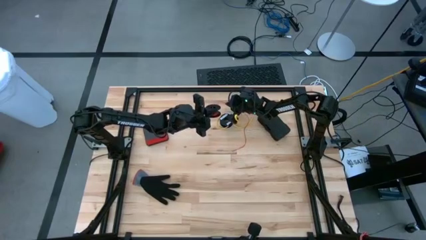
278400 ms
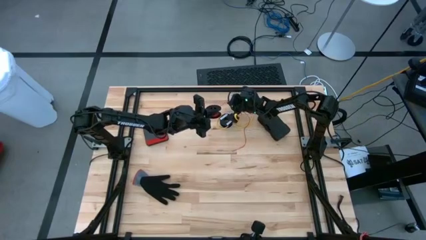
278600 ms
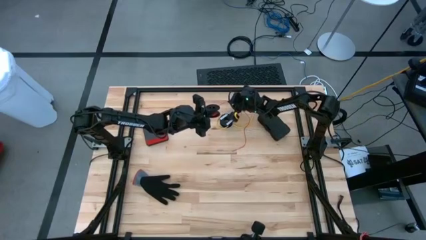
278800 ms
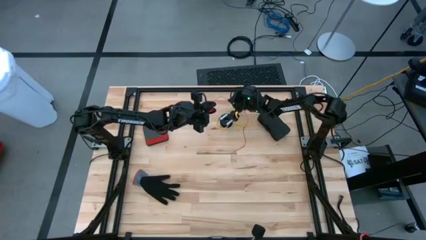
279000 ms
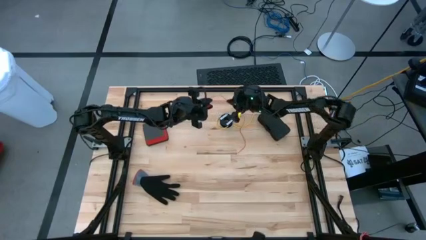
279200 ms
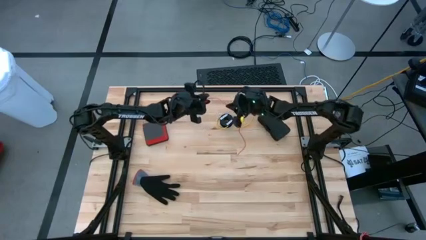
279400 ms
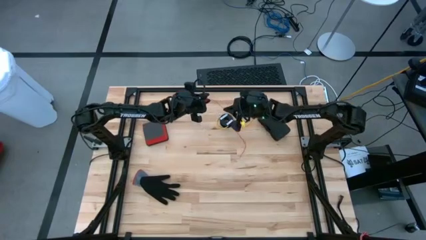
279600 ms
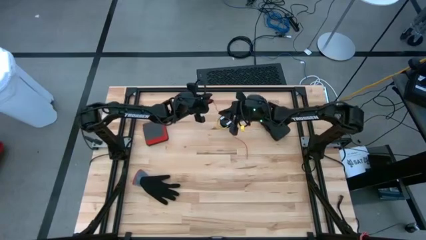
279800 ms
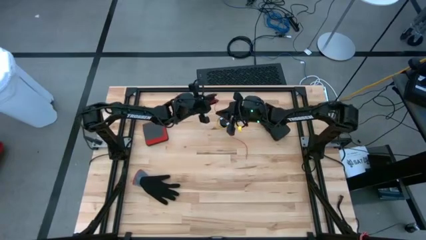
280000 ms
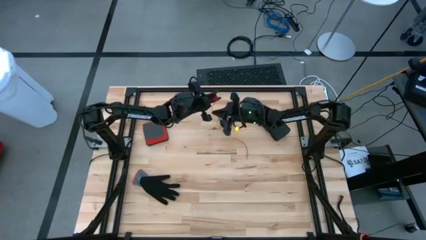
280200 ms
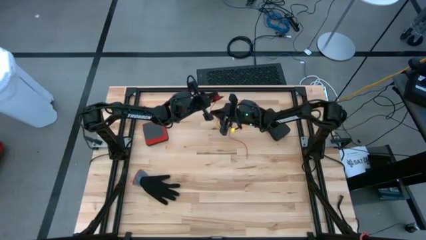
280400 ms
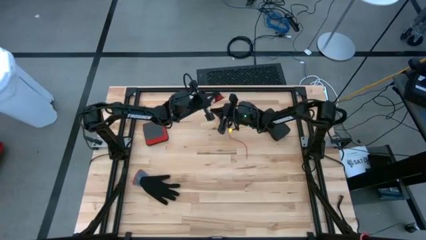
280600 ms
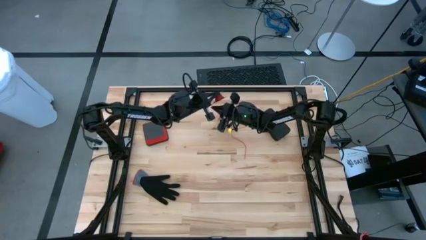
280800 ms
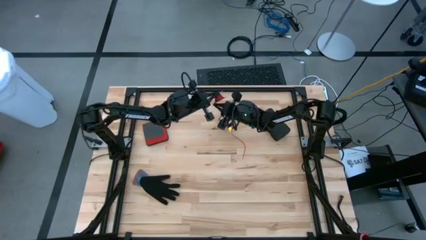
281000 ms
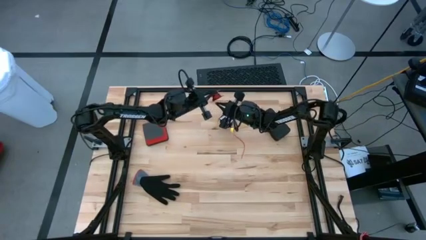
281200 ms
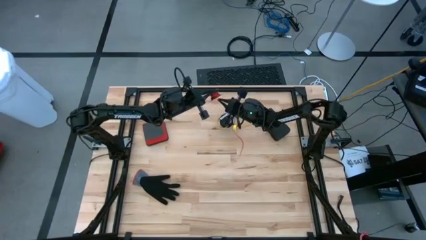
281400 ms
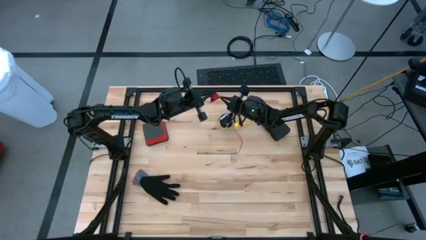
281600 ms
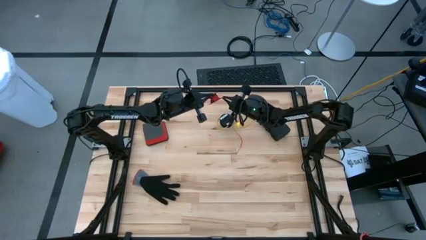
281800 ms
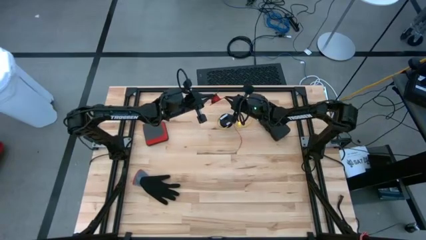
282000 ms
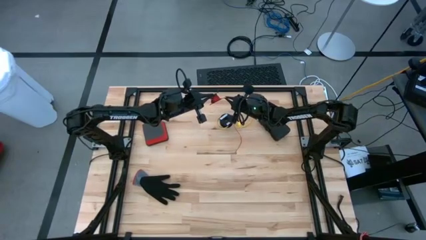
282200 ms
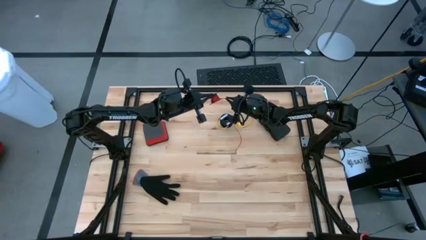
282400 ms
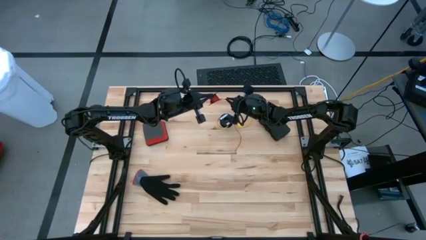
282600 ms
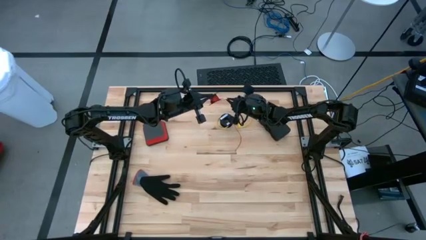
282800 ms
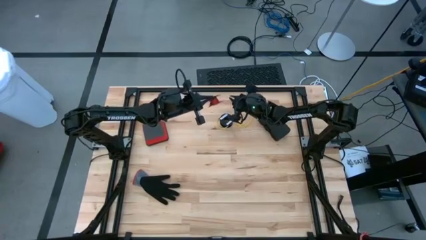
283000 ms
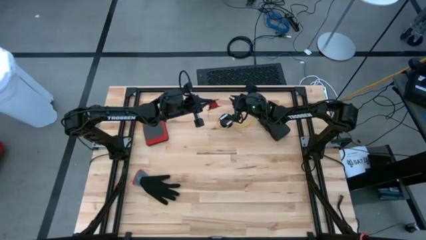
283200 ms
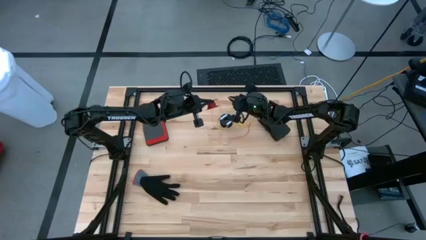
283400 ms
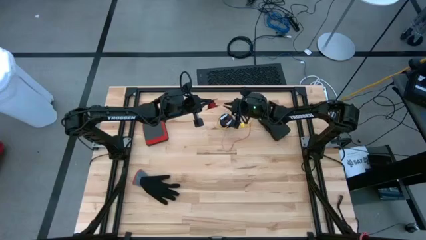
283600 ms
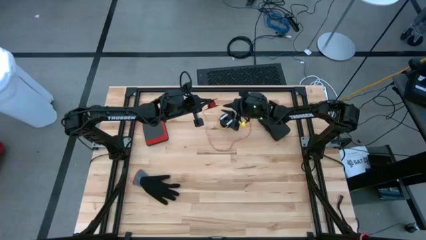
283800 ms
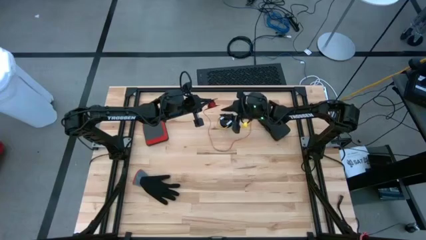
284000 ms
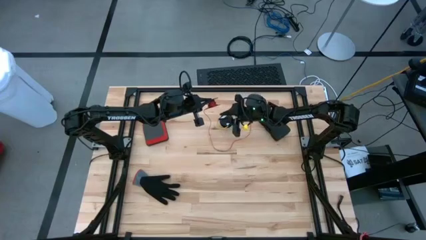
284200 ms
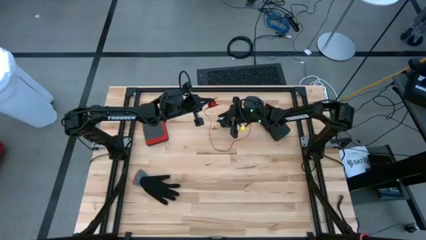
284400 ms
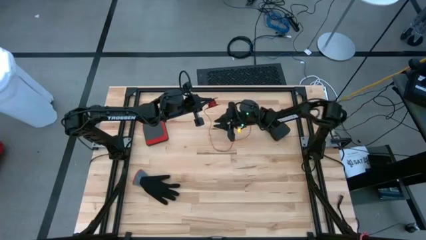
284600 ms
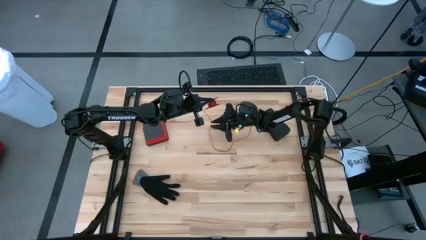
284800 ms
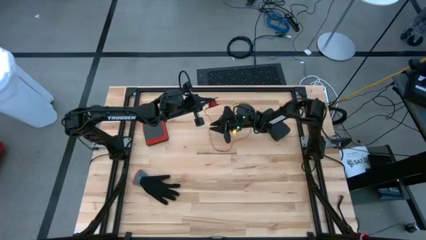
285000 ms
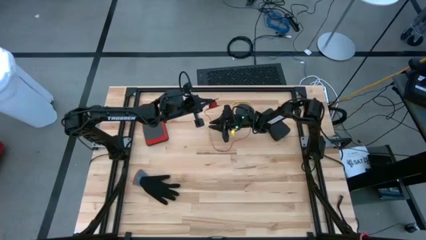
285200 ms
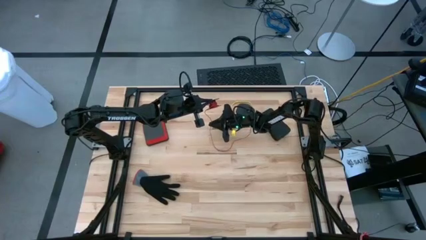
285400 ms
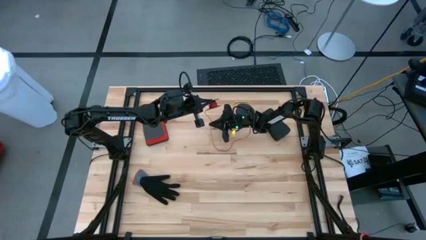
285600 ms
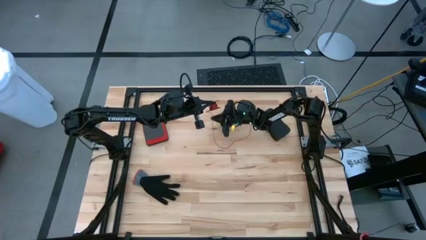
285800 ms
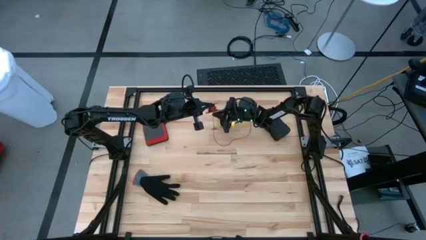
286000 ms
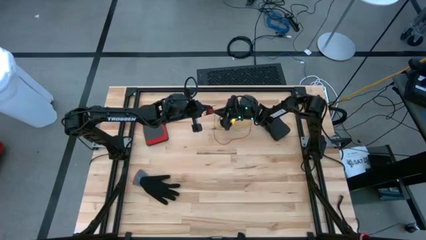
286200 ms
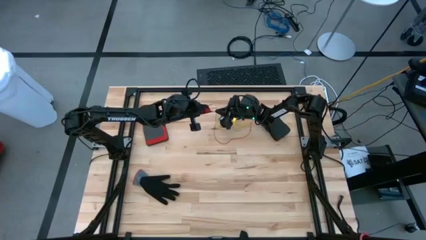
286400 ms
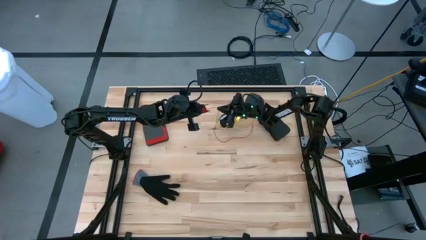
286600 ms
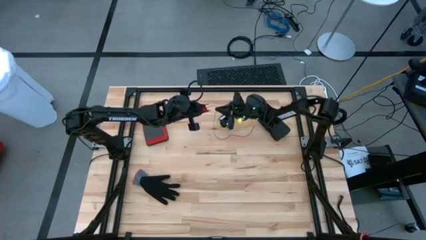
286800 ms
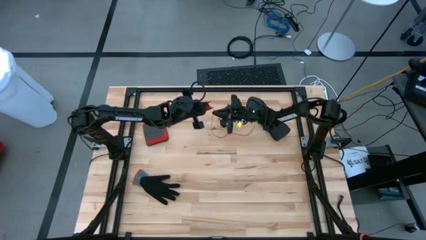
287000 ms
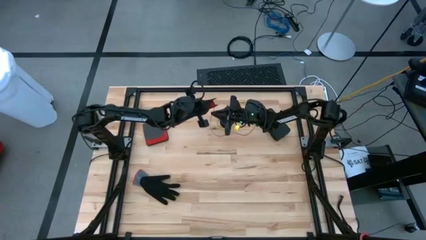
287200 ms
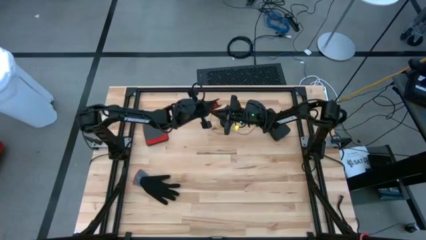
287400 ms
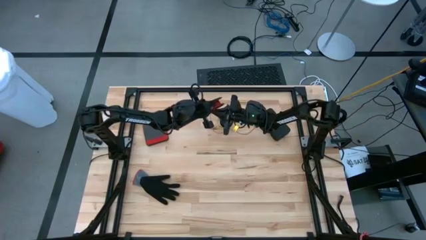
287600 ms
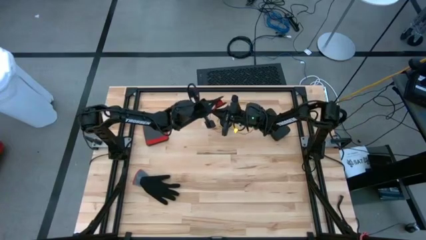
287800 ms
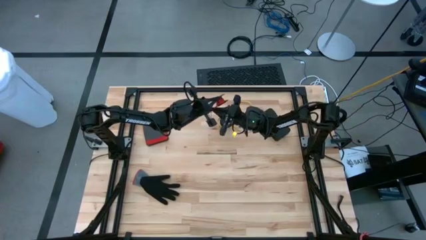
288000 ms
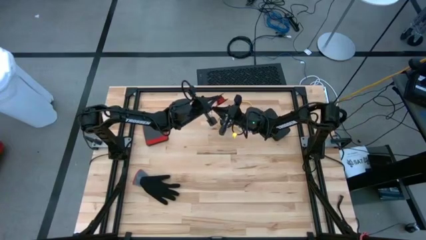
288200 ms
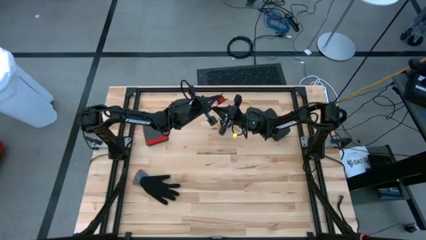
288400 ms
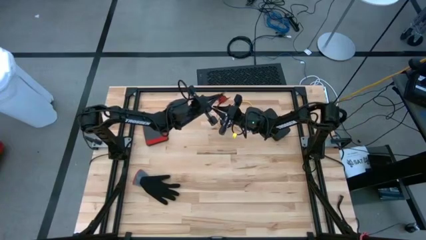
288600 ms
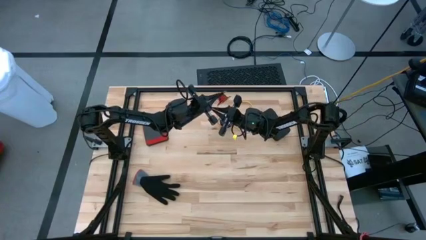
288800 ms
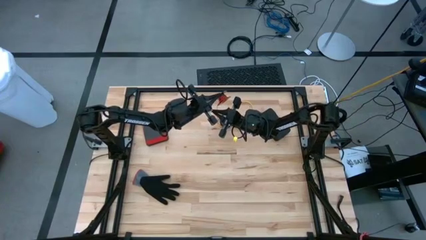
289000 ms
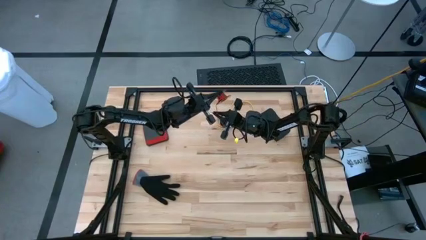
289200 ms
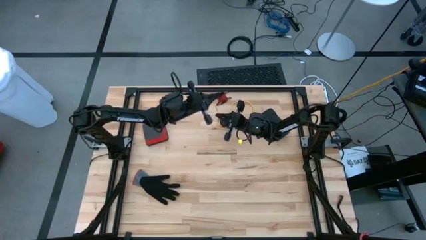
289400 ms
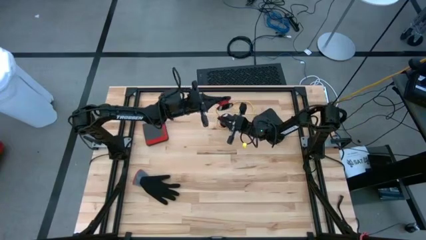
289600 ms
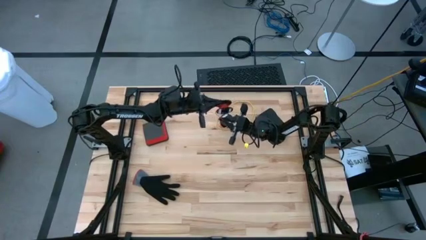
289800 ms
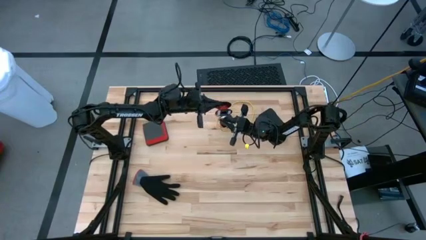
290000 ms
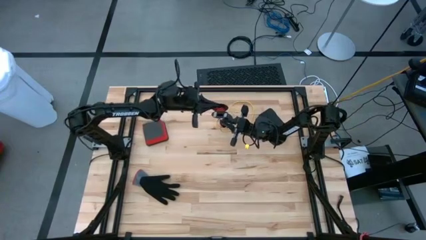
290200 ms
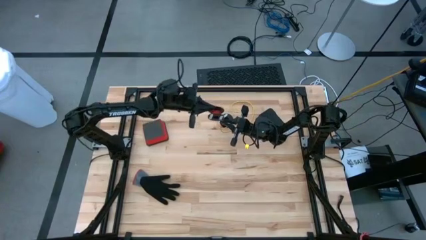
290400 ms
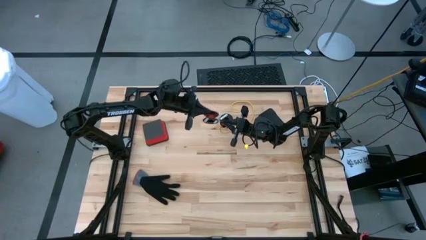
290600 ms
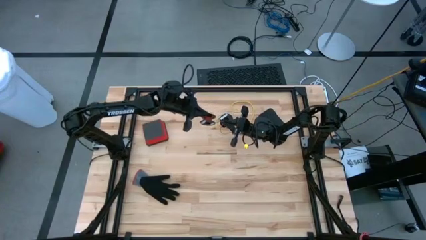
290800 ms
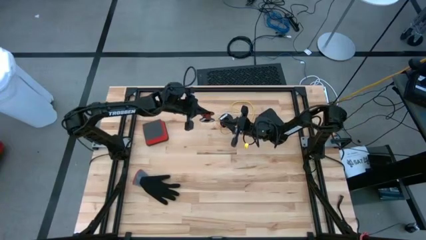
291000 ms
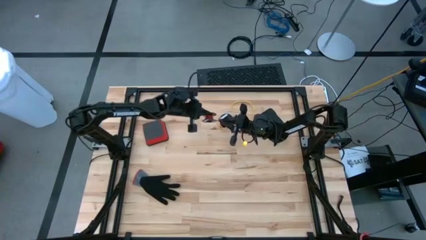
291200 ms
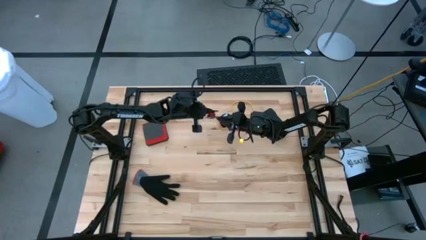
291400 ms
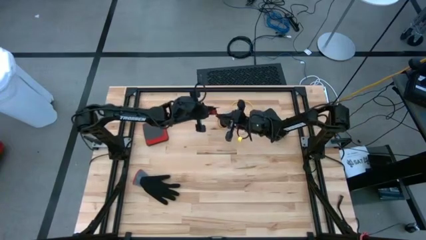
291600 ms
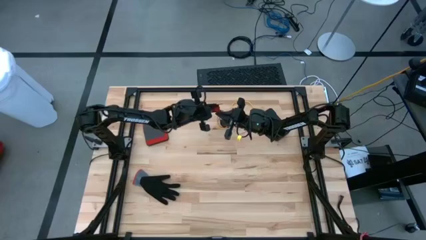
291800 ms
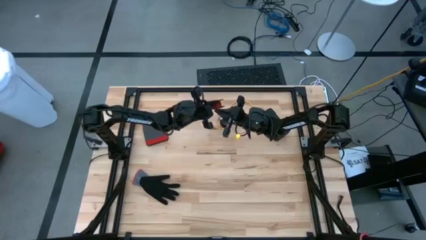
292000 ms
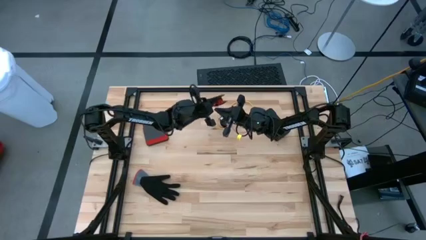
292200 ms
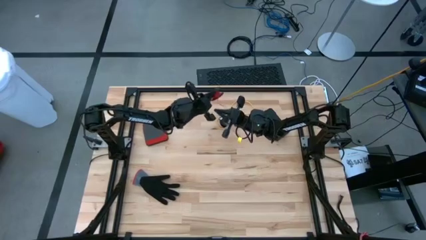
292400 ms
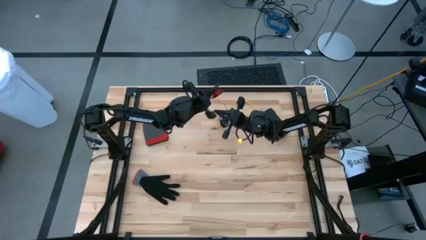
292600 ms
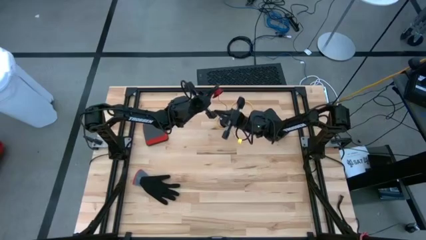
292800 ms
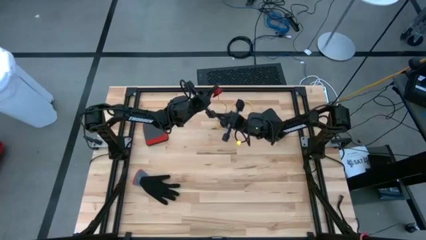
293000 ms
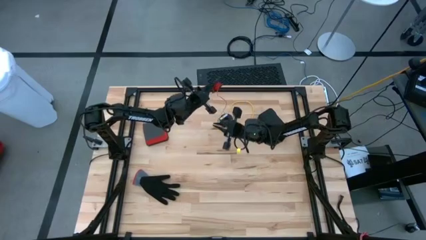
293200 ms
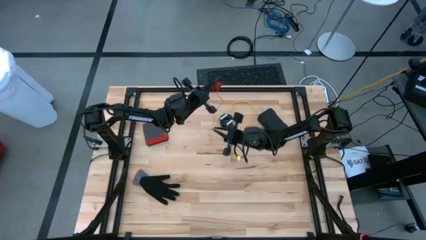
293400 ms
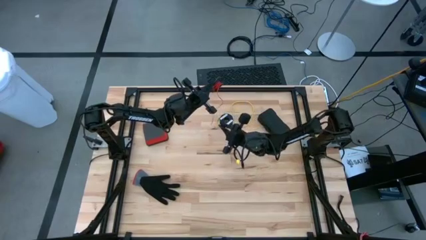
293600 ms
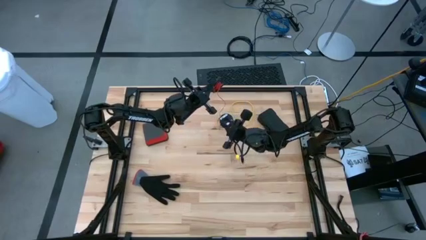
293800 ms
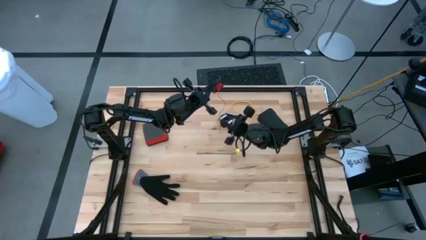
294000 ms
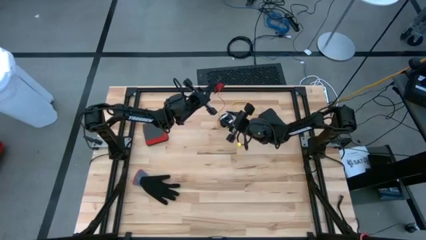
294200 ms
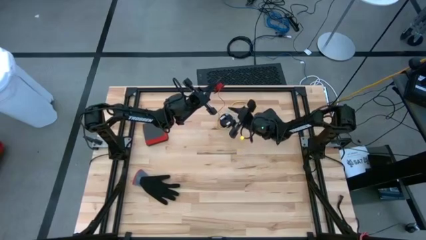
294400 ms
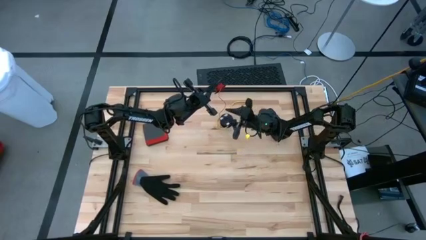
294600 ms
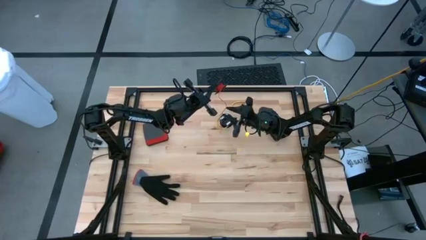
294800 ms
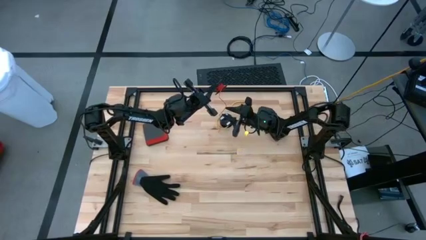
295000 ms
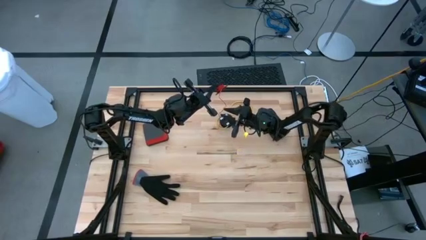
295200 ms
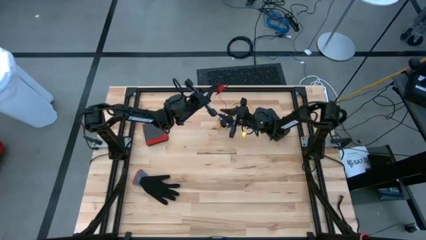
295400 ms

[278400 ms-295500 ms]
Task: Coil cords
Coil the red wire into the spool
